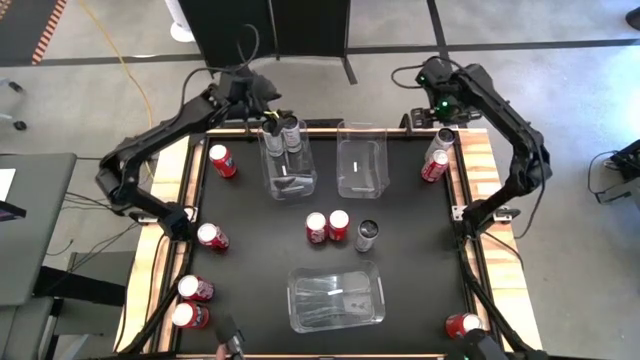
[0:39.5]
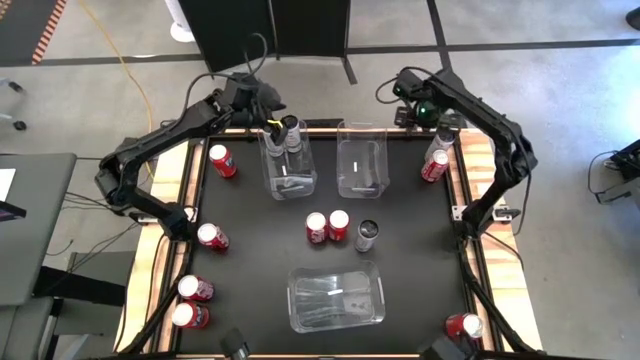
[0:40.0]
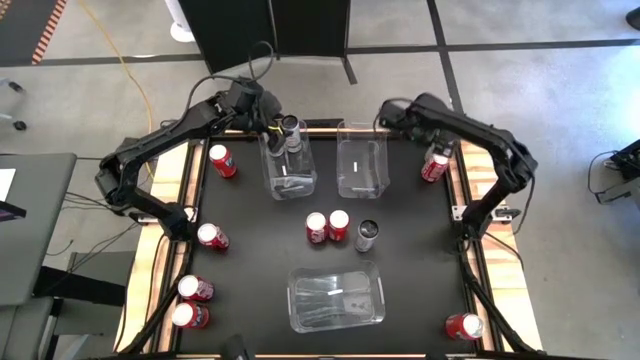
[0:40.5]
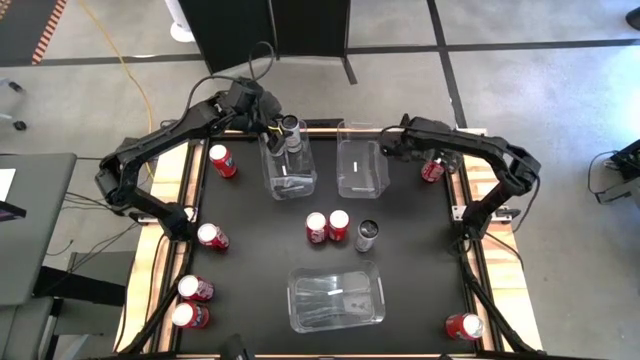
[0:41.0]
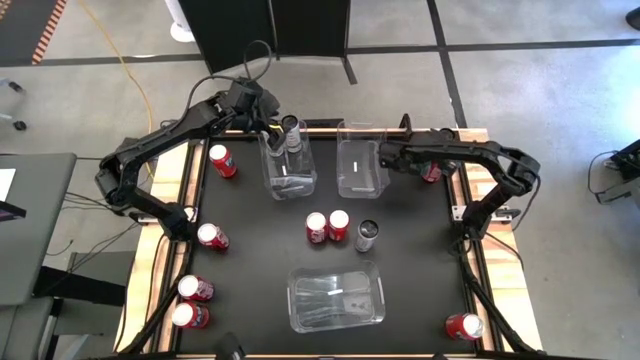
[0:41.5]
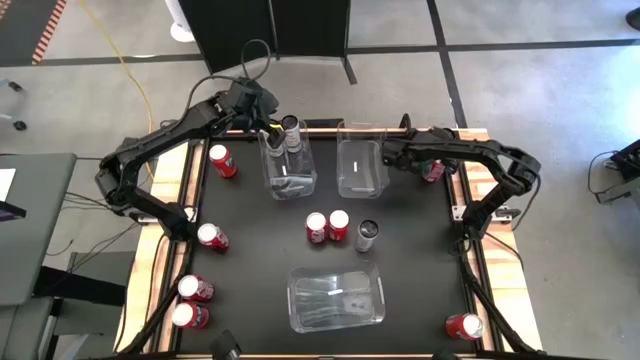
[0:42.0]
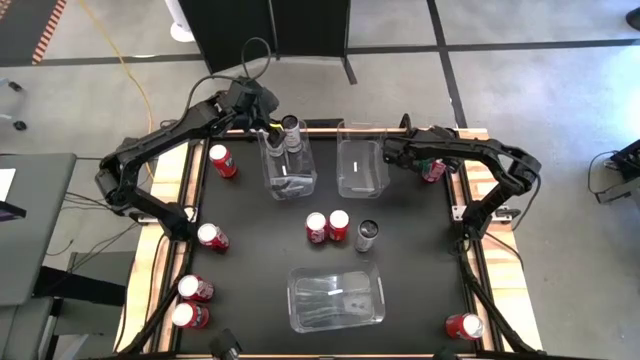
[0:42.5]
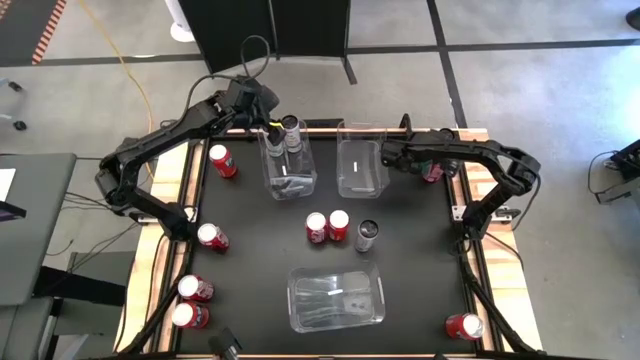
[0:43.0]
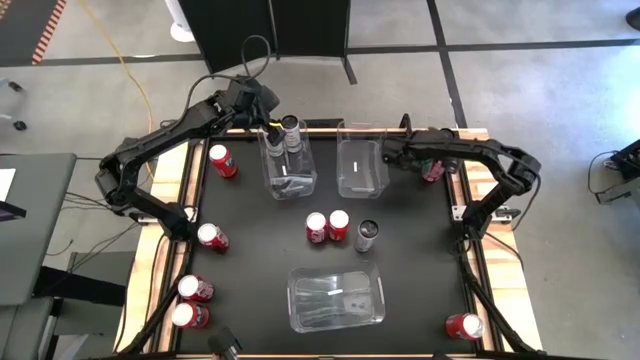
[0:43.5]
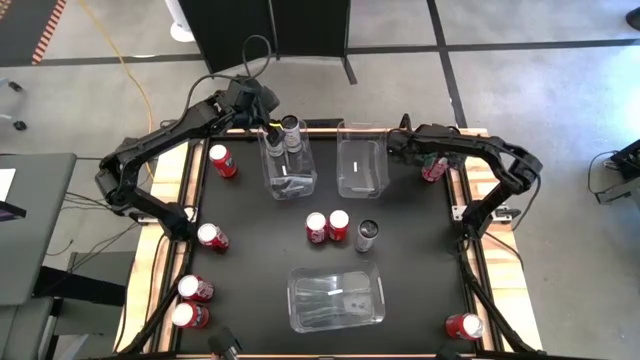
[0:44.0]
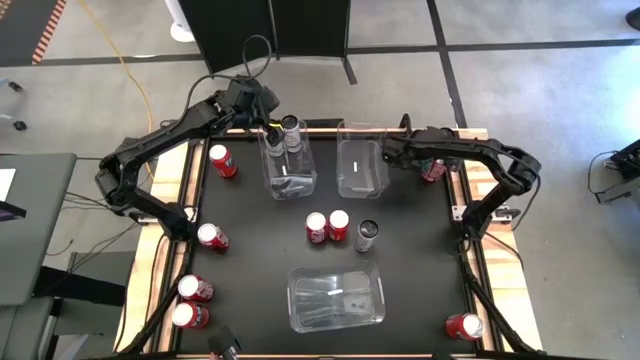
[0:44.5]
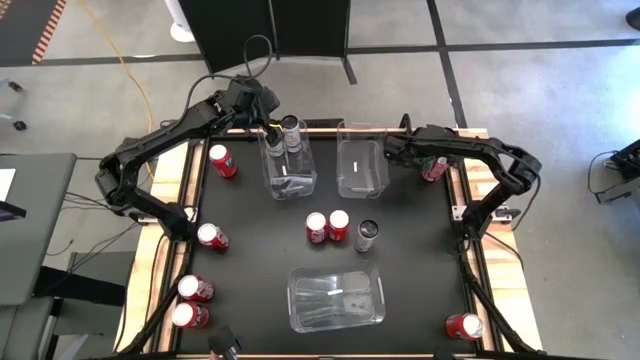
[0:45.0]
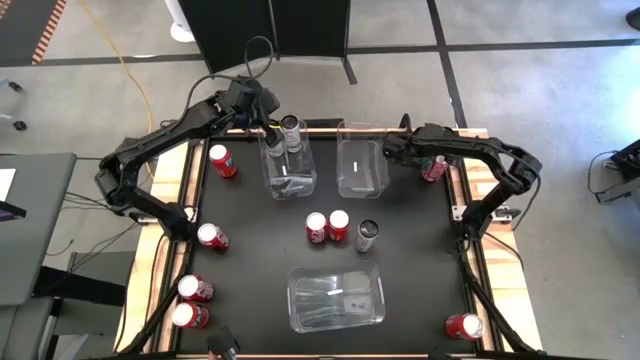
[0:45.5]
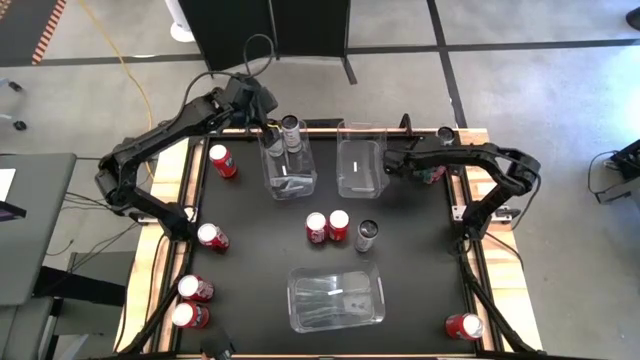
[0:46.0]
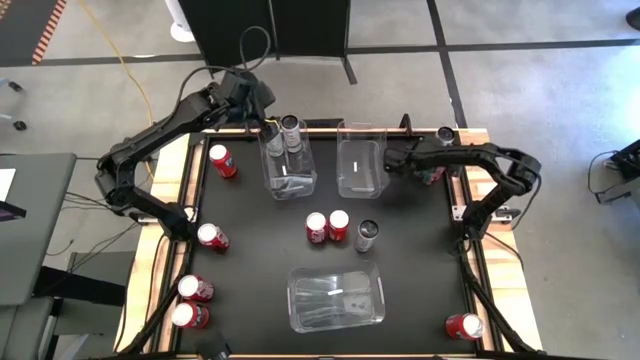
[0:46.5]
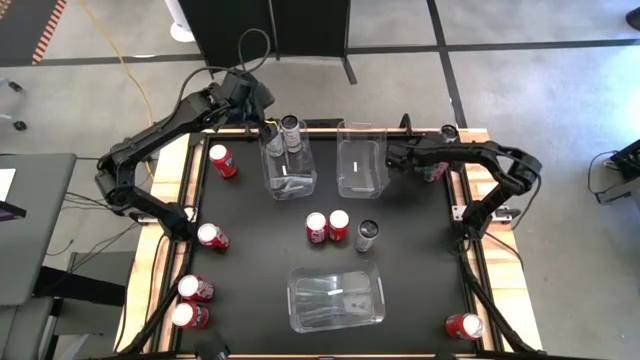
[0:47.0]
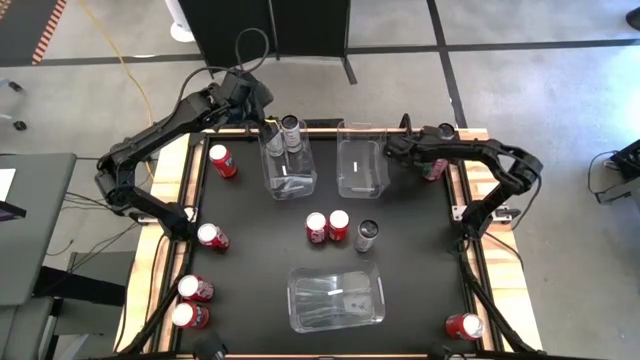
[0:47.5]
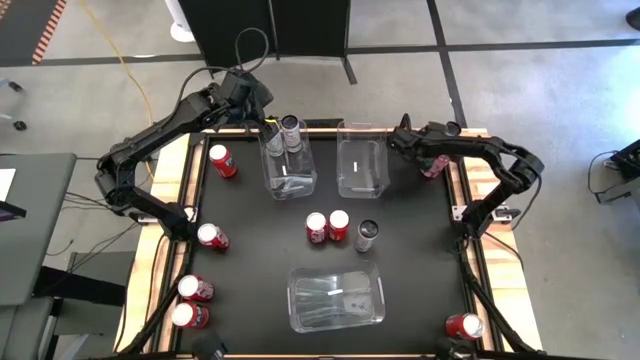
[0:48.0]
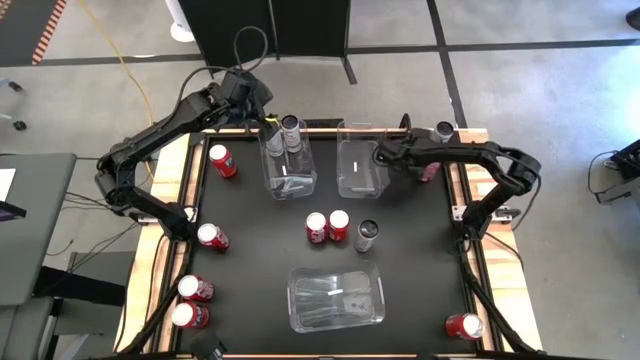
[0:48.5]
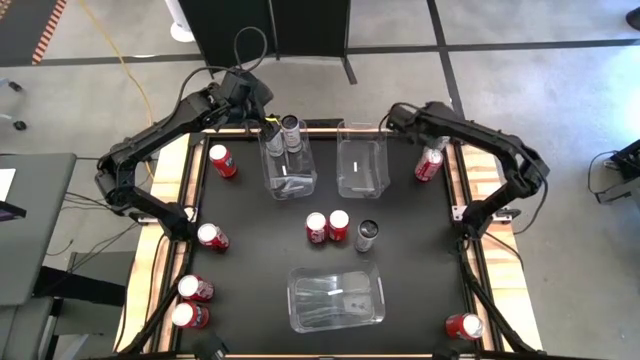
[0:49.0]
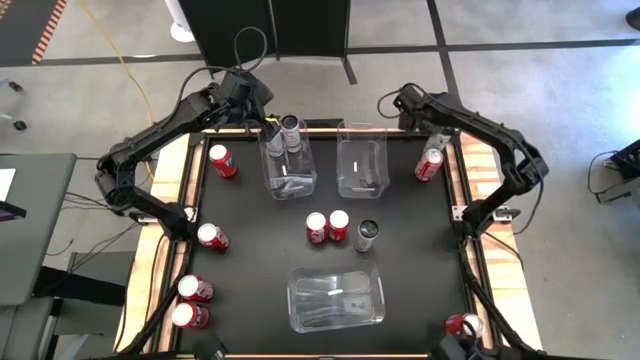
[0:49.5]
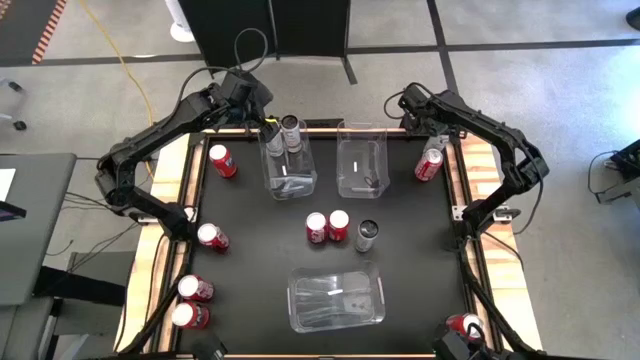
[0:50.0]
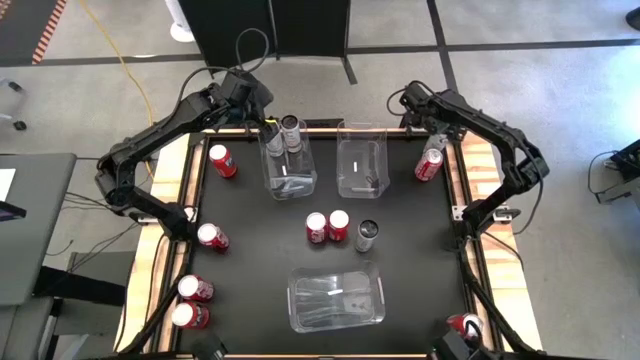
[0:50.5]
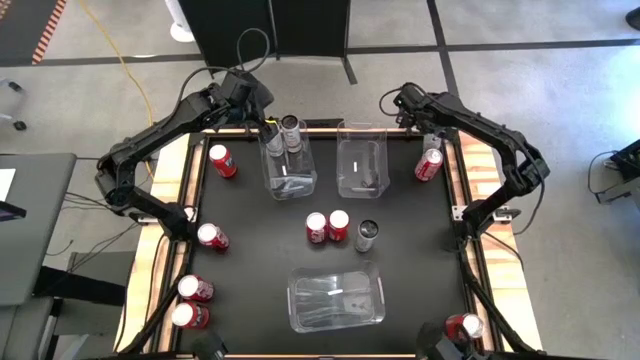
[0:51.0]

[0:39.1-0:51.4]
Task: Sort soda cans
Put the top white soda can into the top left transparent bin

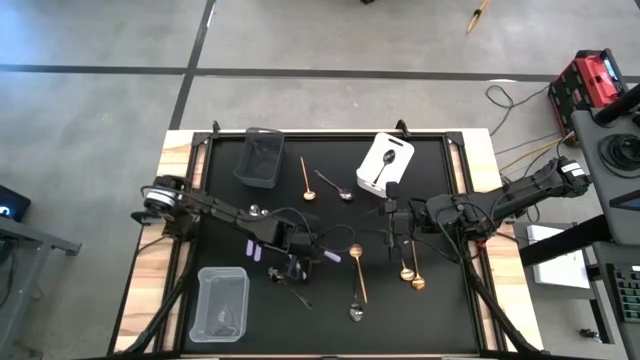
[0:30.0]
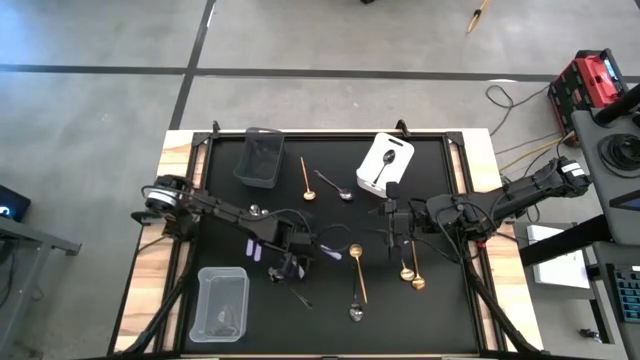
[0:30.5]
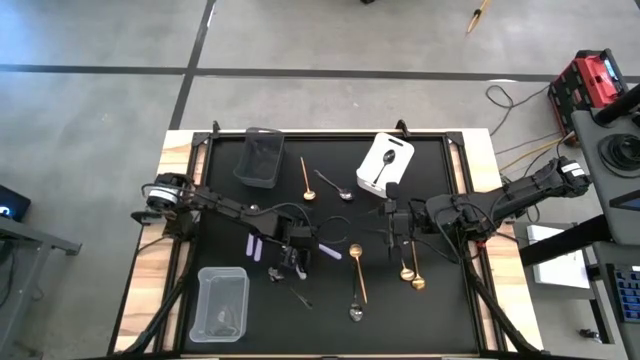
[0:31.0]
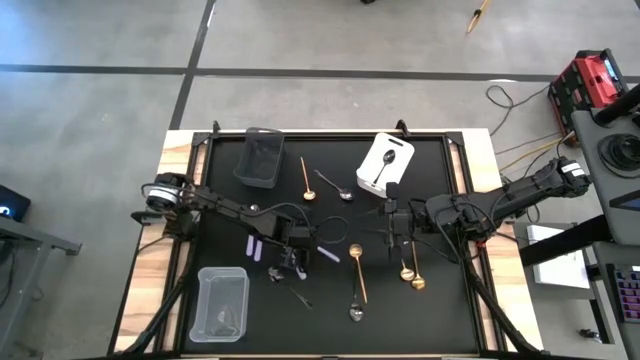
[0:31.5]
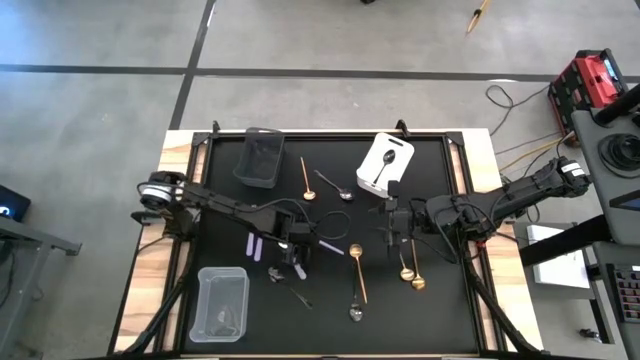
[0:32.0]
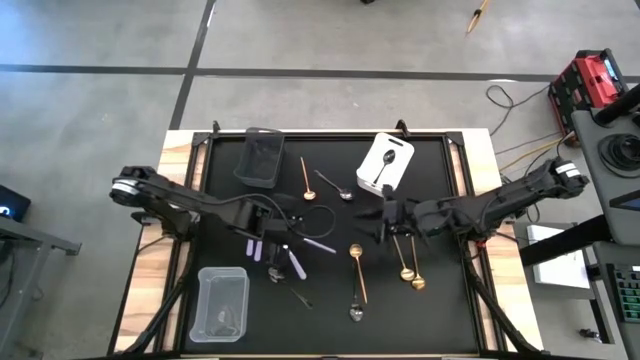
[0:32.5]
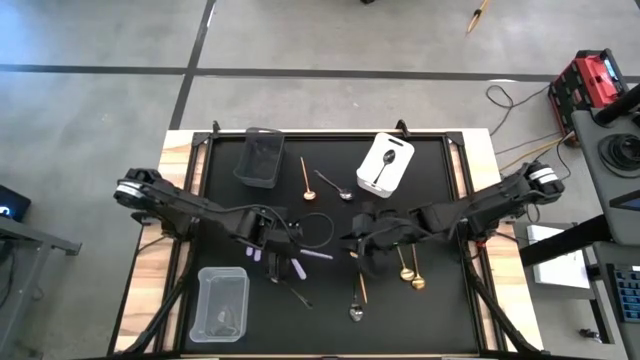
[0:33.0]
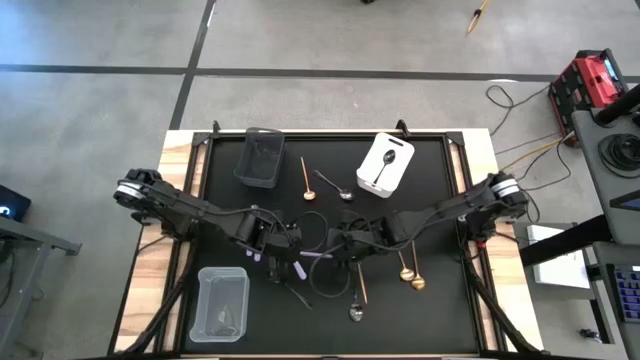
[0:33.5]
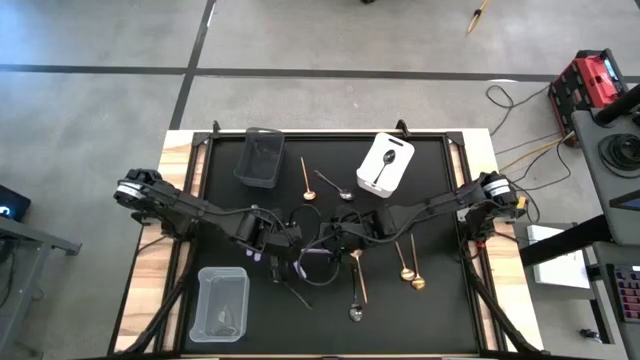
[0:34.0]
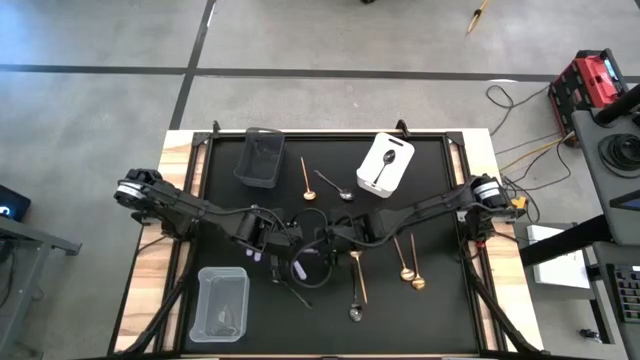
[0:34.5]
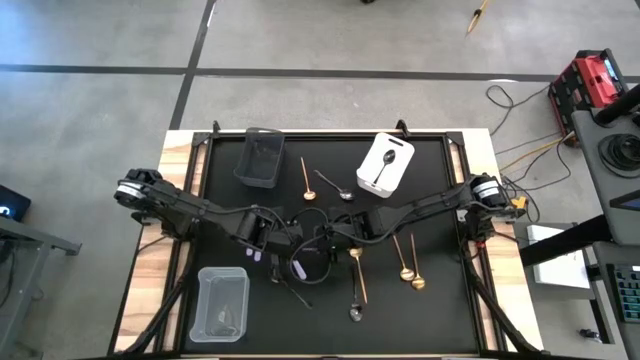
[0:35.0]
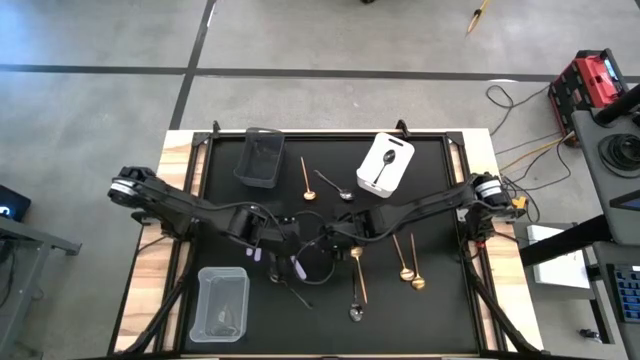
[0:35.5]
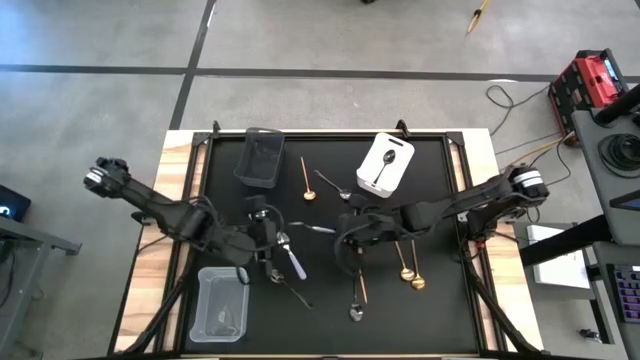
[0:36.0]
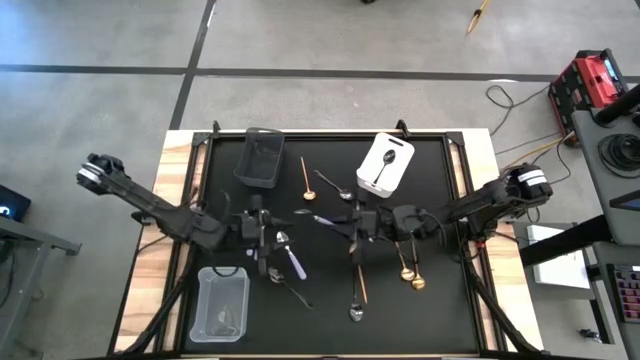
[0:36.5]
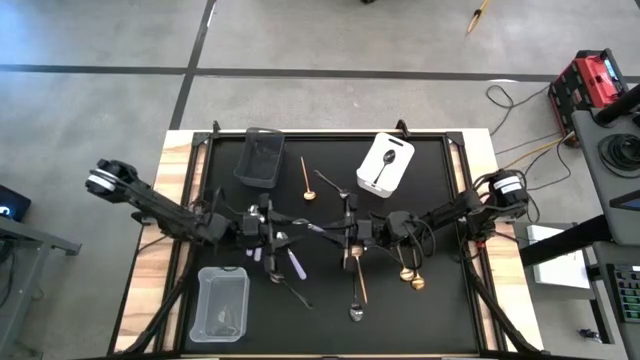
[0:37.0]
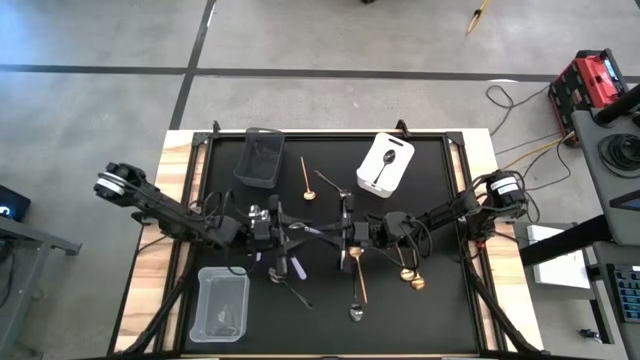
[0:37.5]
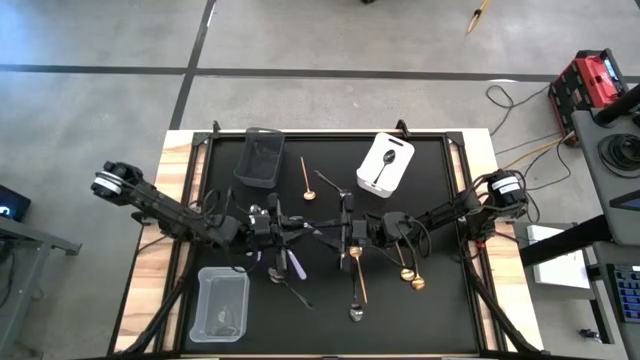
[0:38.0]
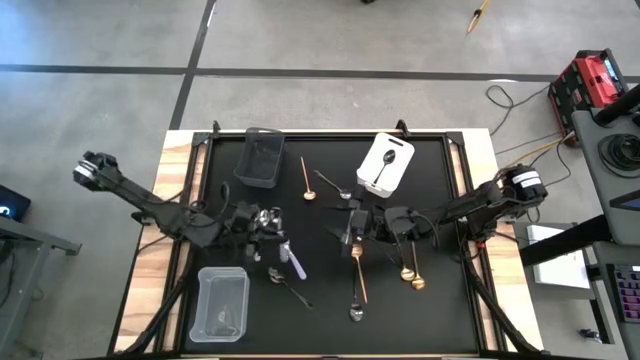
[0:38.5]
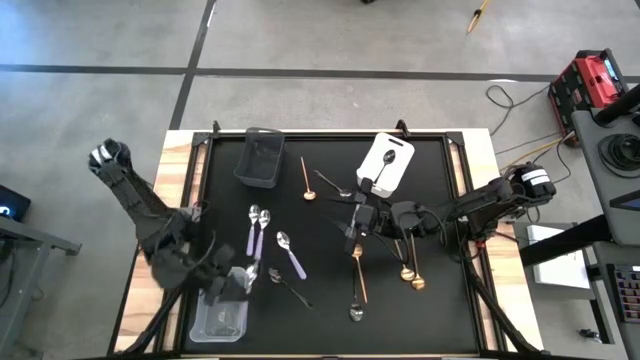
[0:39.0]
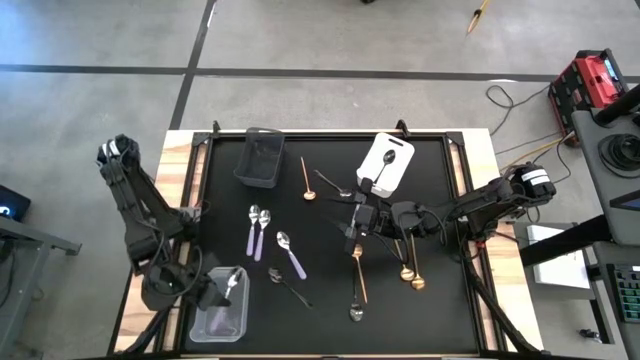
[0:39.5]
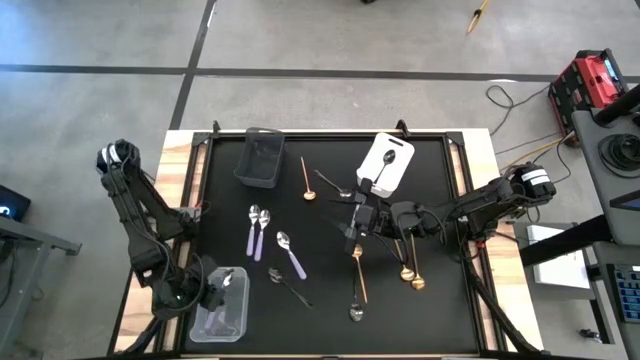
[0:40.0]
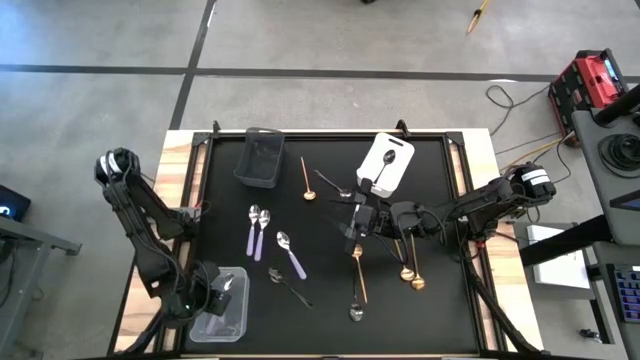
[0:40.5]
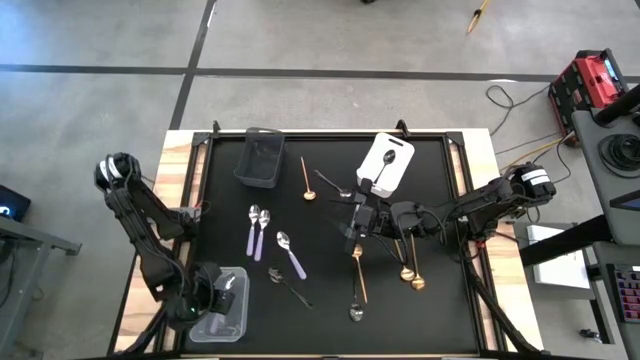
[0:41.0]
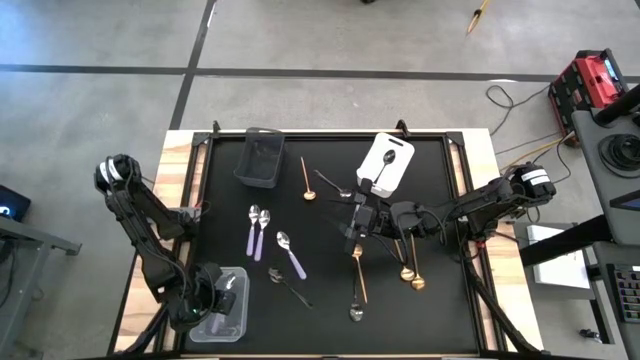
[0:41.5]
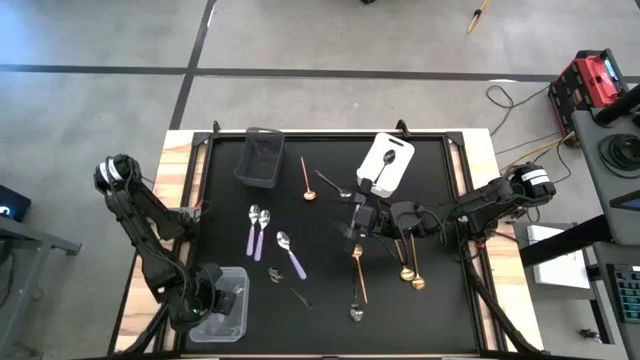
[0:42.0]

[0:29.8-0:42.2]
Task: Sort silverware by color (type)
Put the purple spoon into the transparent bin
